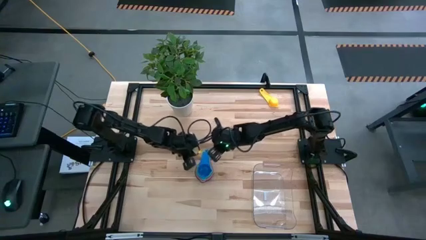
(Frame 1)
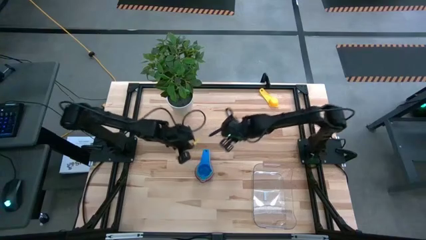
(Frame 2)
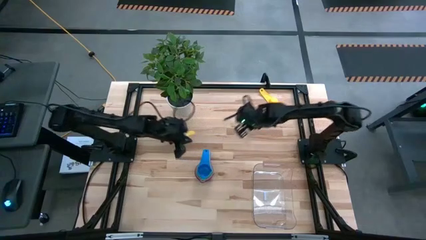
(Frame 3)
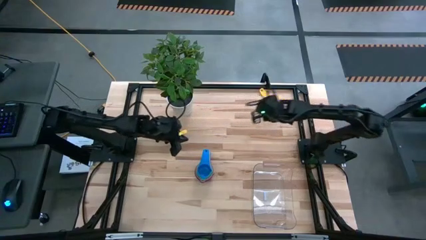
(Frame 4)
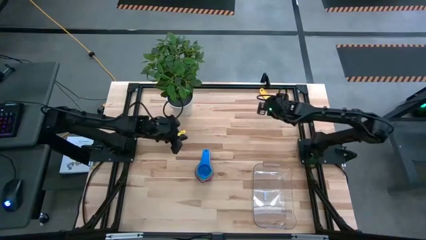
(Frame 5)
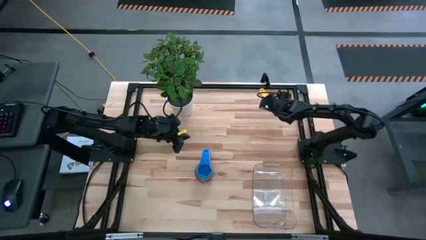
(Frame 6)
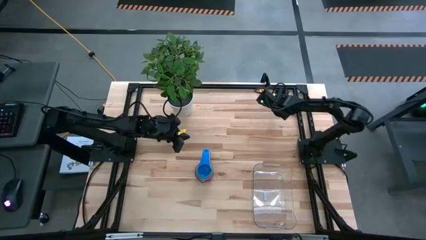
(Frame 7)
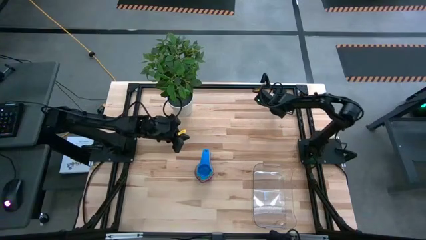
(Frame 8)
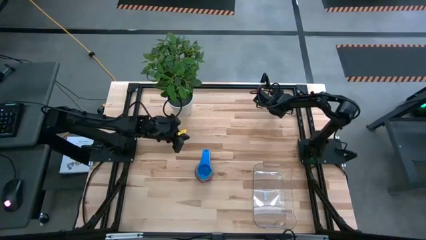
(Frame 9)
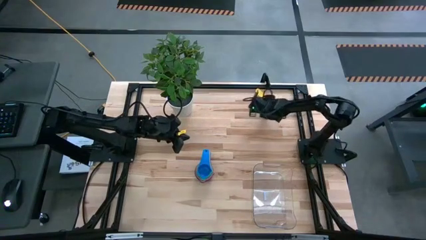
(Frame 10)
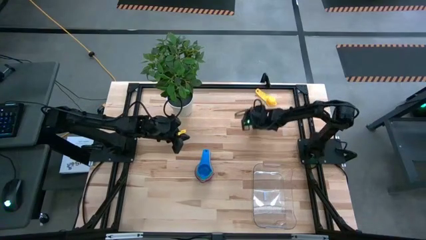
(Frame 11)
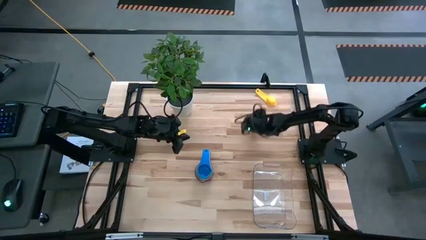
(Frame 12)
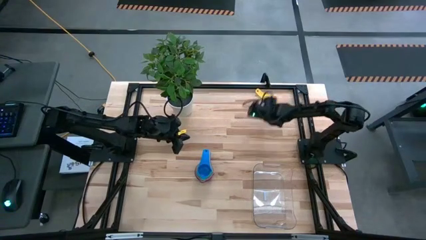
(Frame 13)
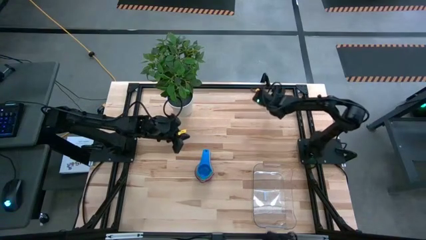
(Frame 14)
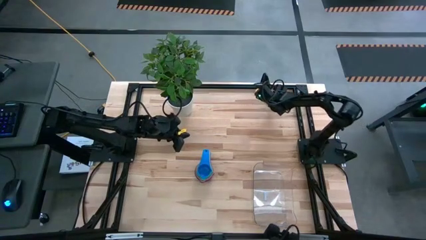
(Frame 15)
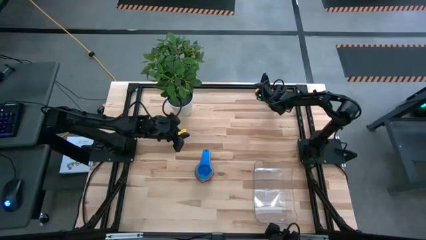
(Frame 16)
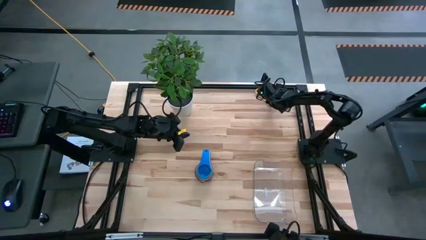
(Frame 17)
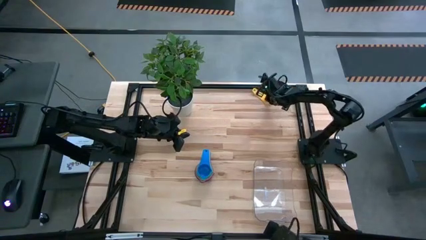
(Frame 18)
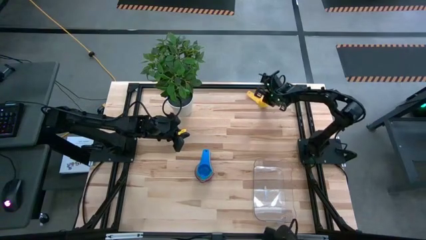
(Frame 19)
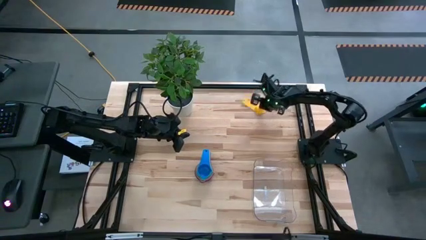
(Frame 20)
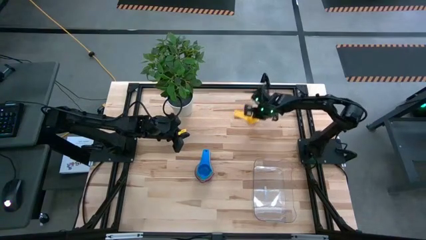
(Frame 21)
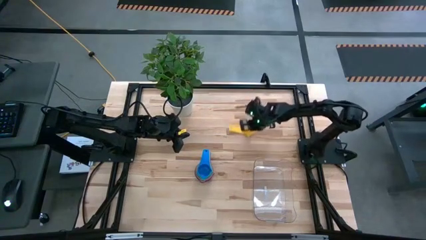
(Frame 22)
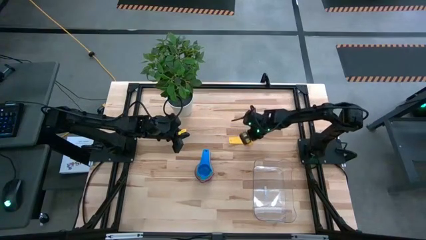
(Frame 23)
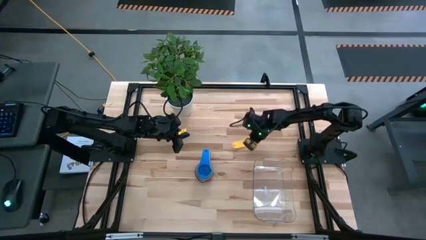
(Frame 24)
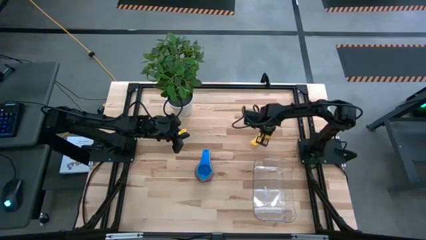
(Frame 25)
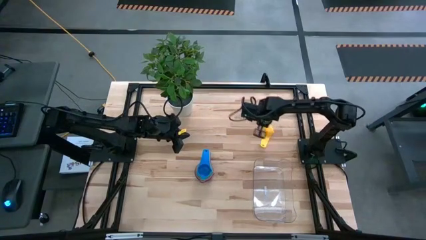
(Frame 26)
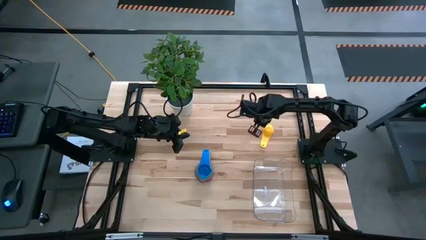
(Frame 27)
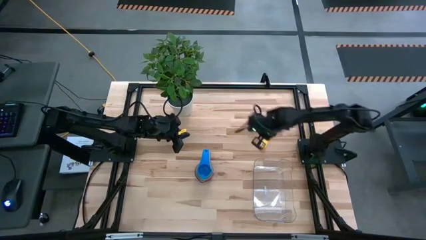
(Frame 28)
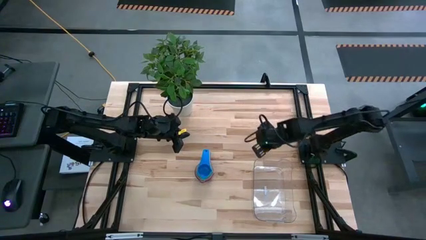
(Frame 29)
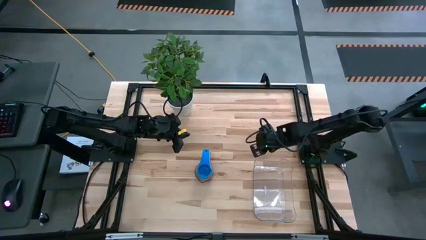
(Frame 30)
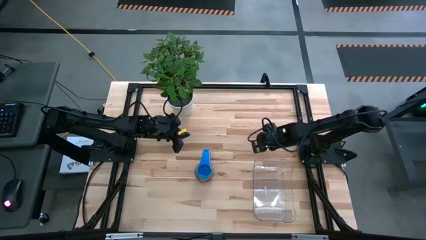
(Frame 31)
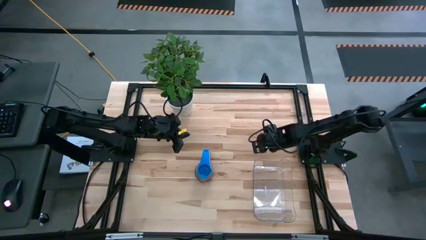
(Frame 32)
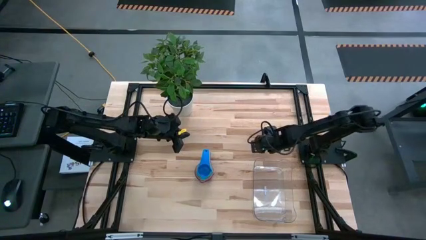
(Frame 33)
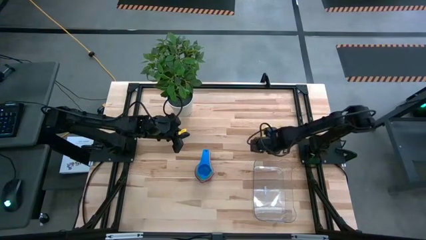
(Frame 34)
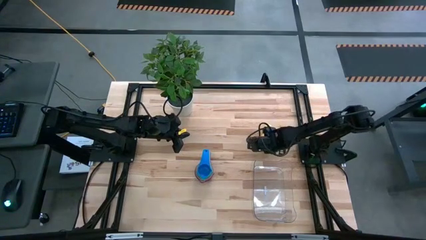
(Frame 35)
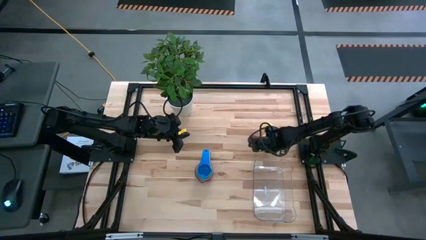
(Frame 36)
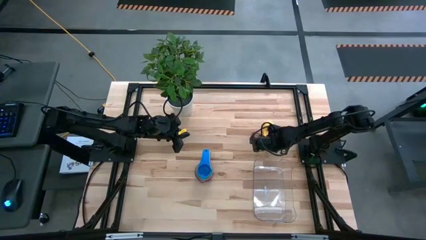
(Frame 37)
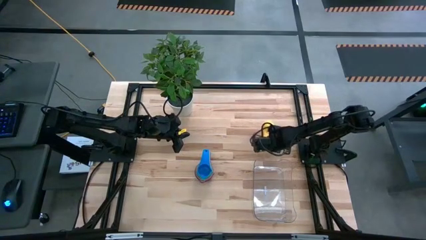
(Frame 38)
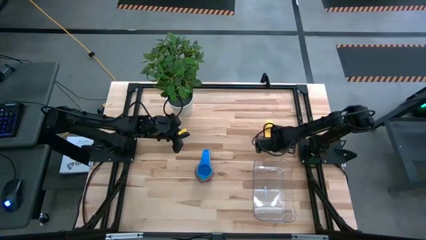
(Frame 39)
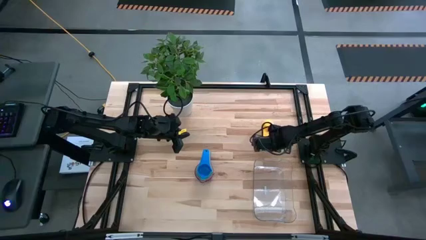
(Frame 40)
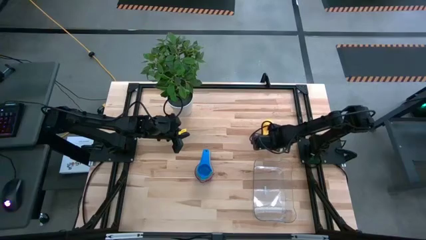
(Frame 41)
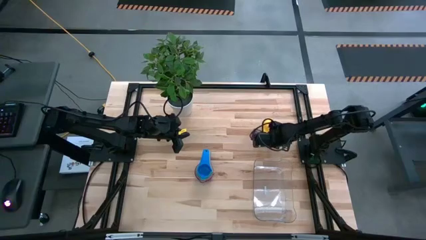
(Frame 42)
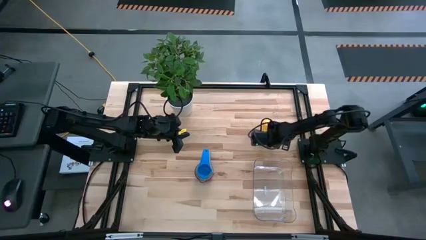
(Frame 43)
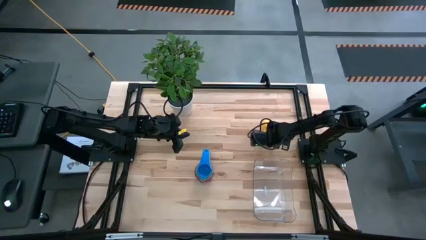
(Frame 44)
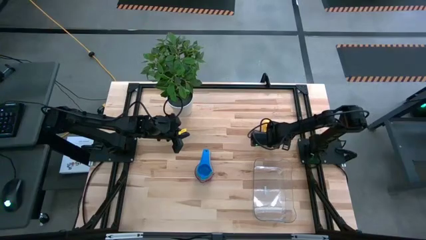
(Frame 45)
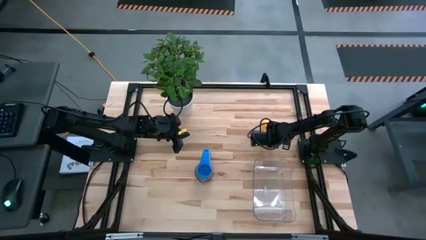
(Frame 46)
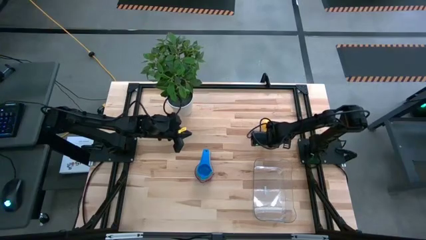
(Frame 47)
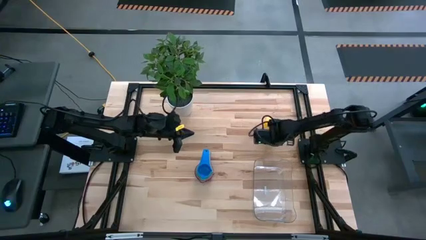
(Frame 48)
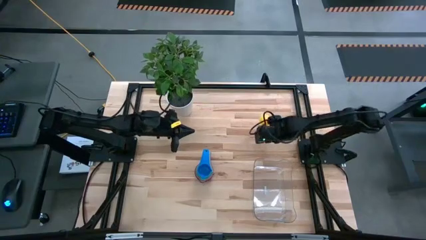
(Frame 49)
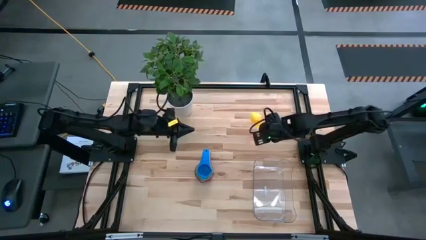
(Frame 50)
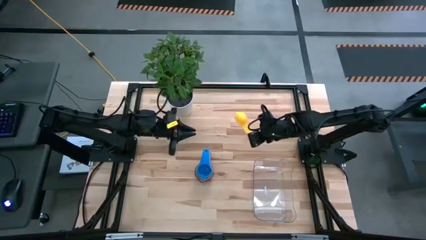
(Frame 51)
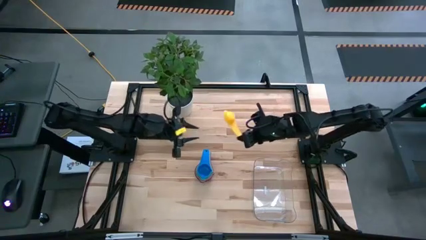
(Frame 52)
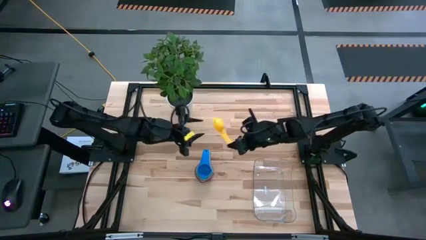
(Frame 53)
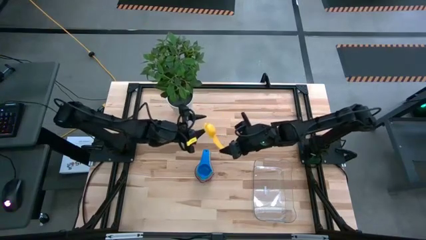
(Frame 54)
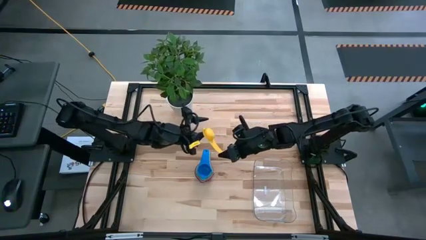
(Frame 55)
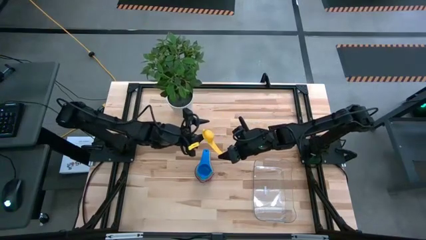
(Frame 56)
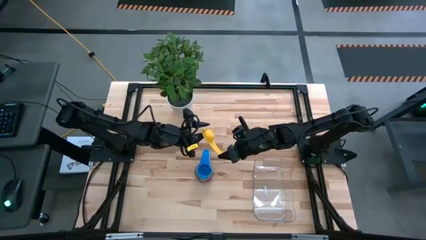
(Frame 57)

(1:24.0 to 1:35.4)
Task: Nest measuring cups in basket
Stack the yellow measuring cup on top of the blue measuring cup
